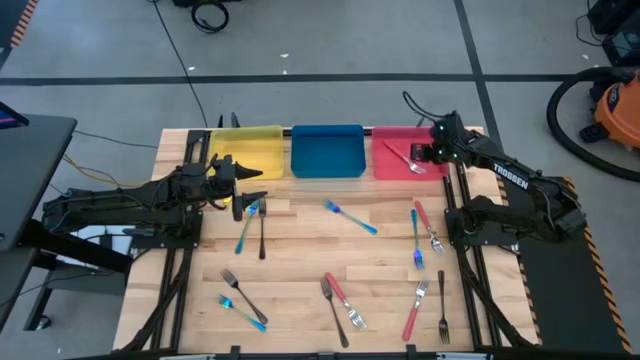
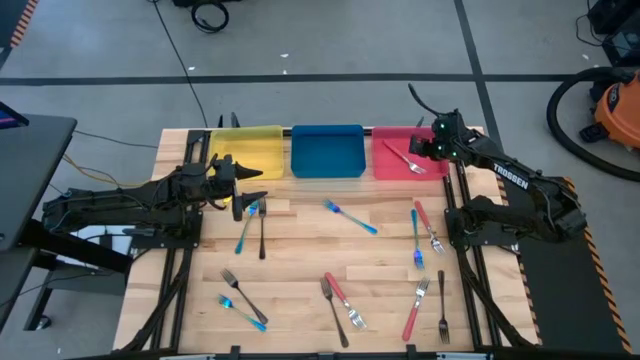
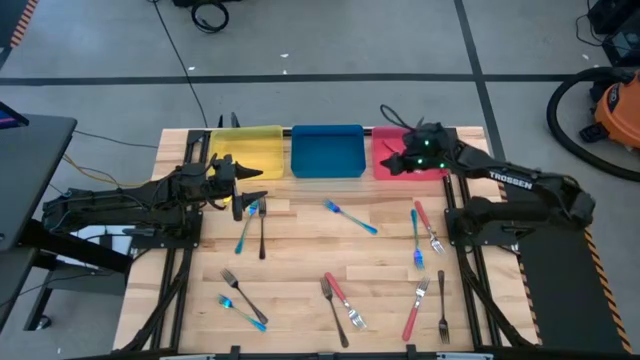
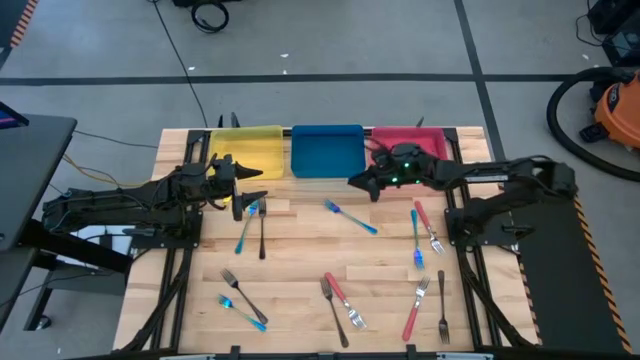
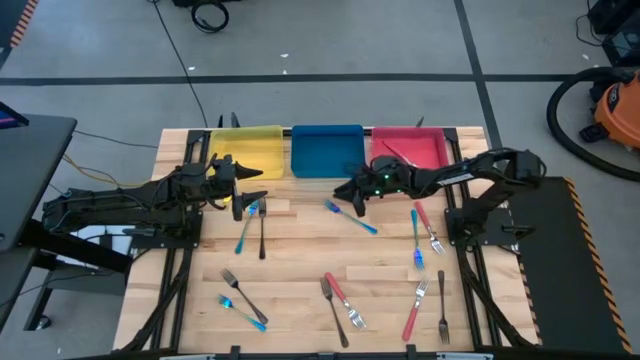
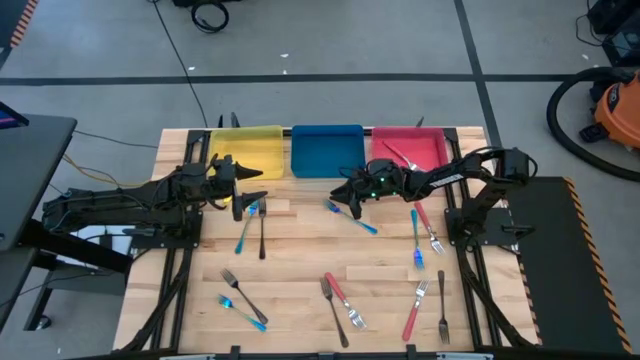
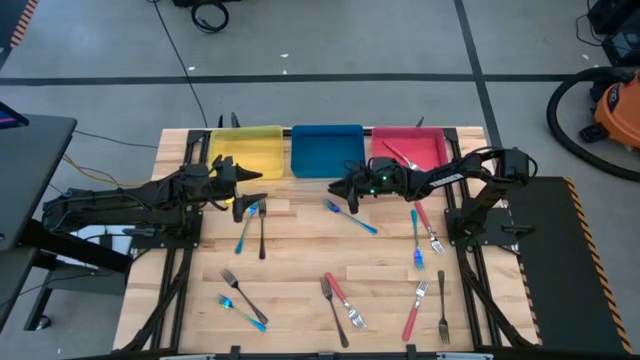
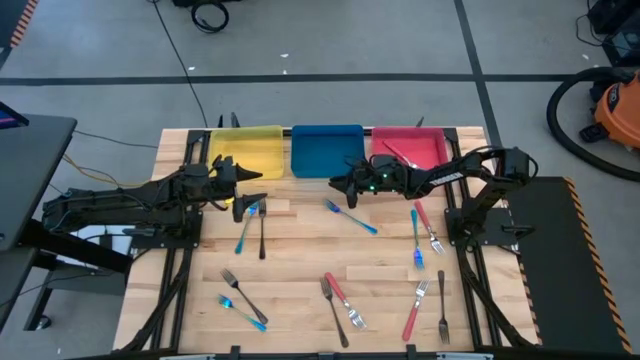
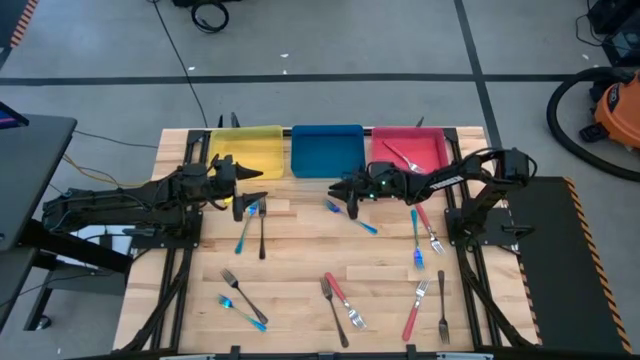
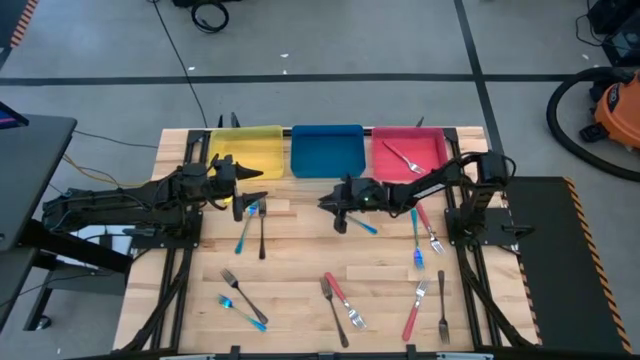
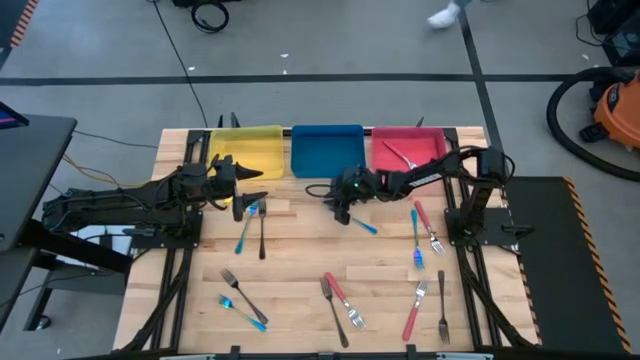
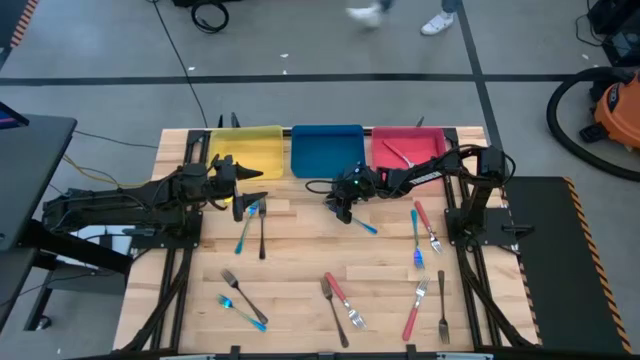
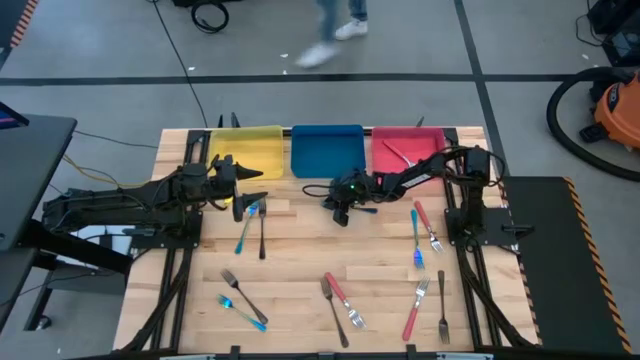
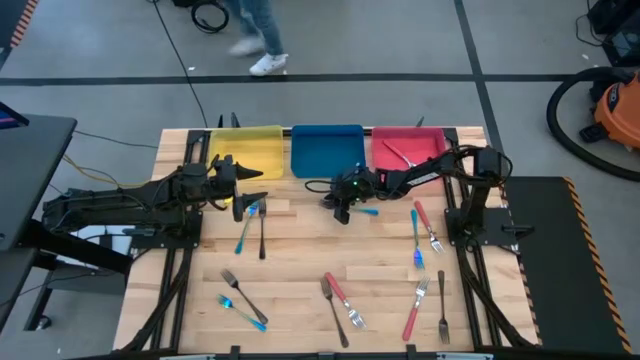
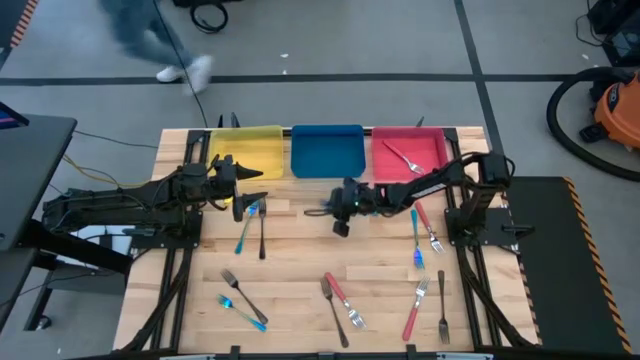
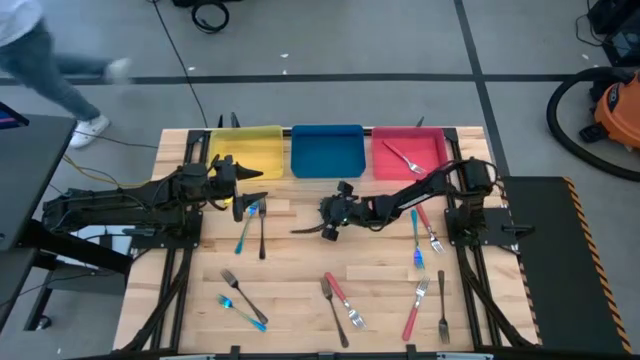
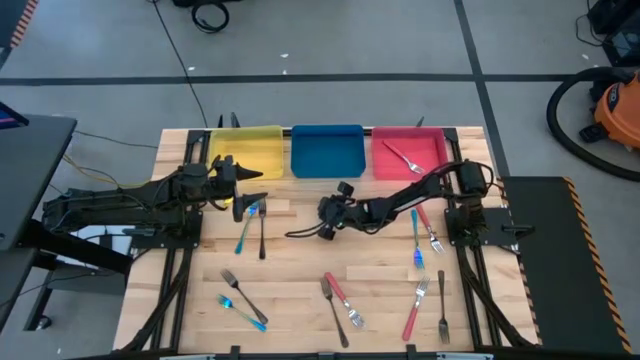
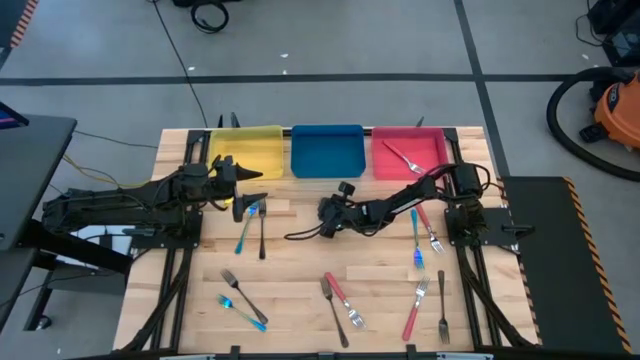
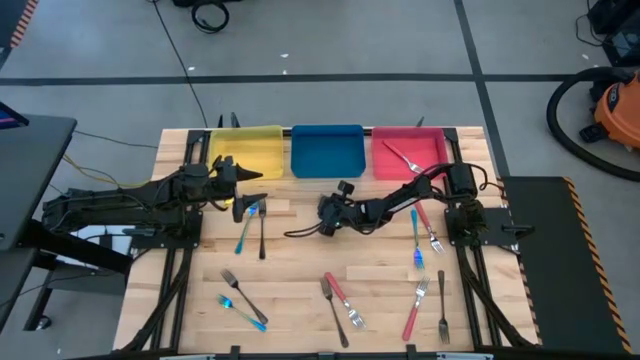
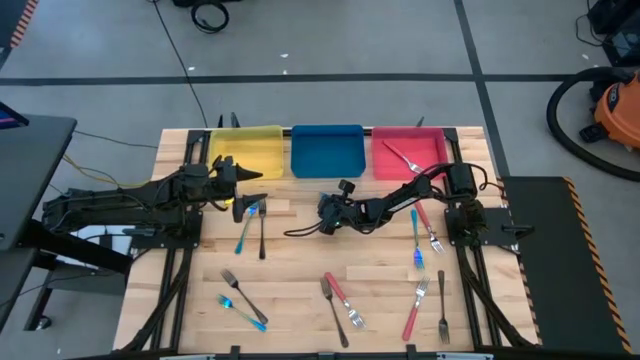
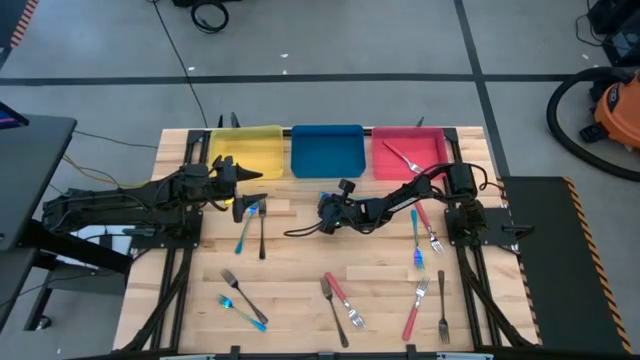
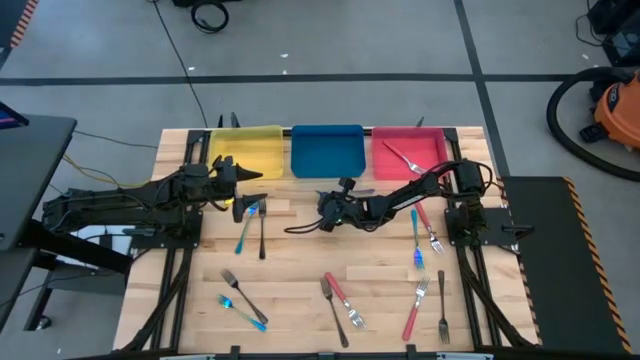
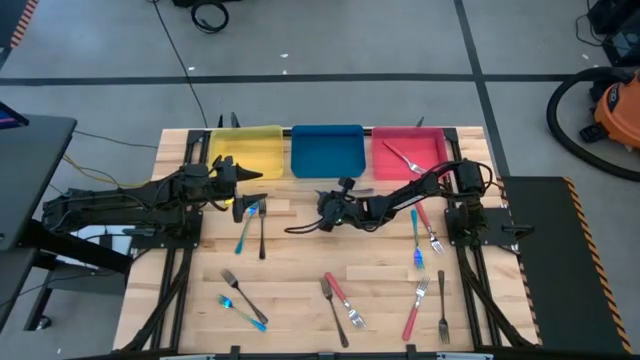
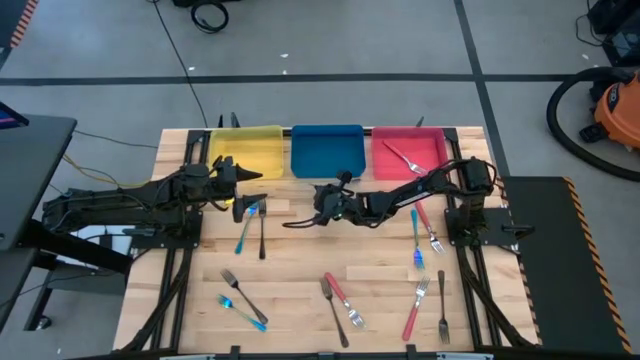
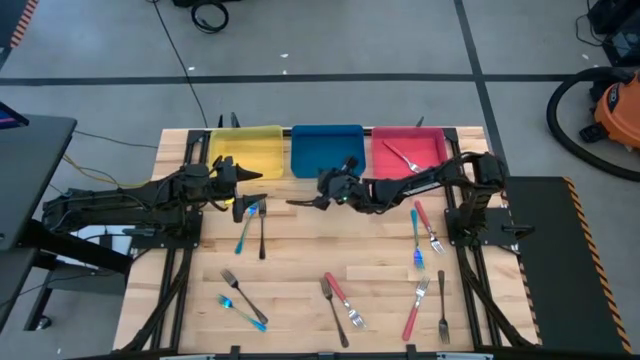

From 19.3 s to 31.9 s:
Task: Sort silverware by color (type)
Put the middle top blue fork into the blue bin
